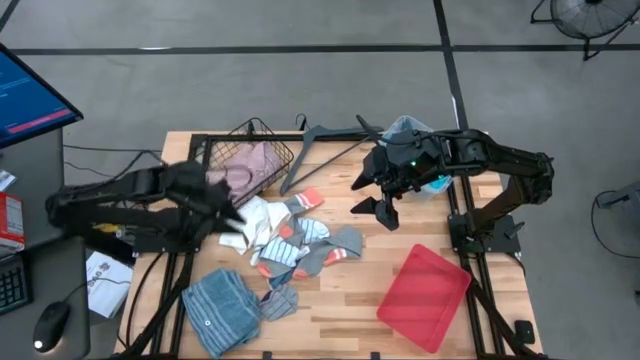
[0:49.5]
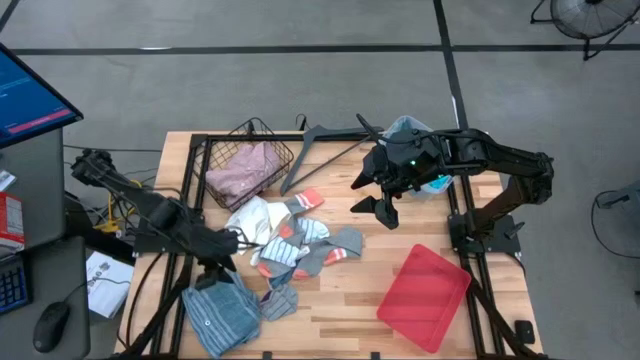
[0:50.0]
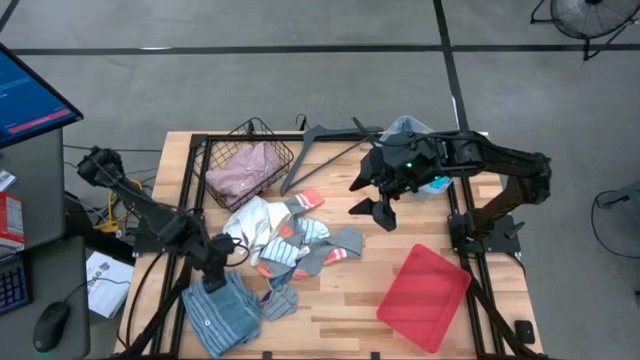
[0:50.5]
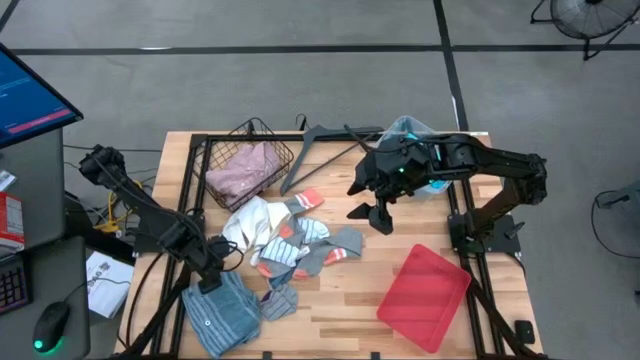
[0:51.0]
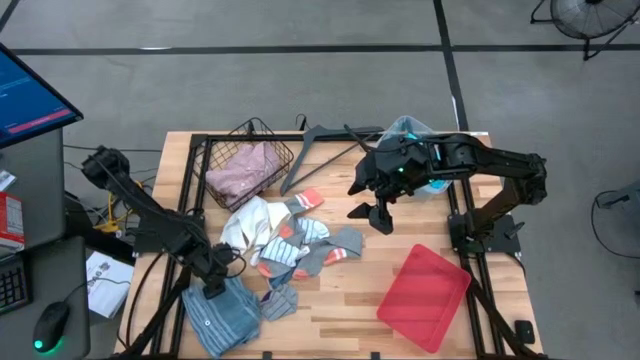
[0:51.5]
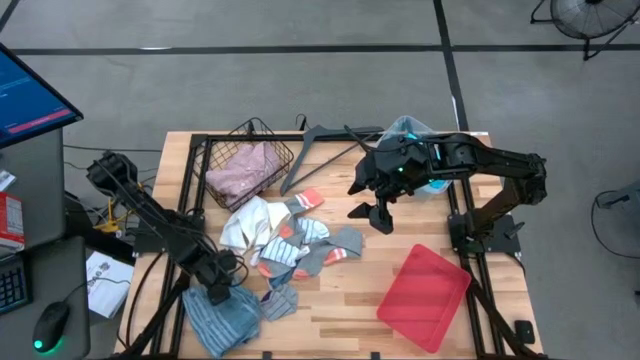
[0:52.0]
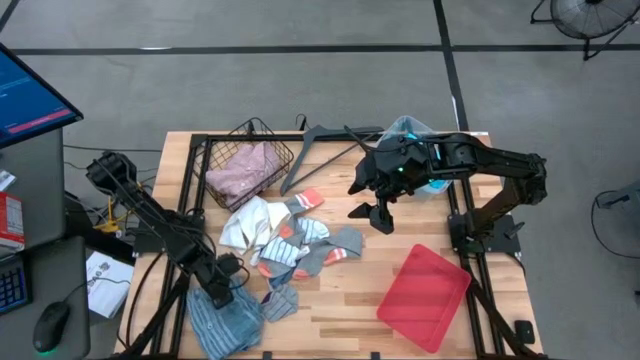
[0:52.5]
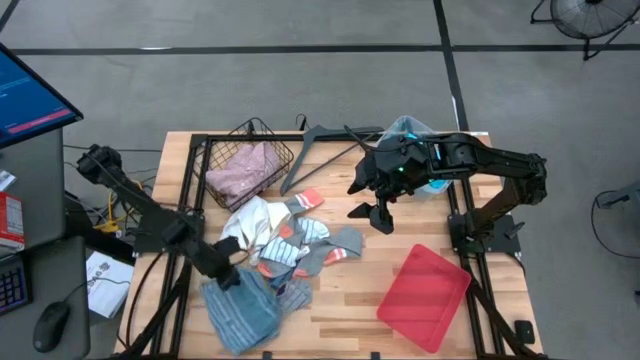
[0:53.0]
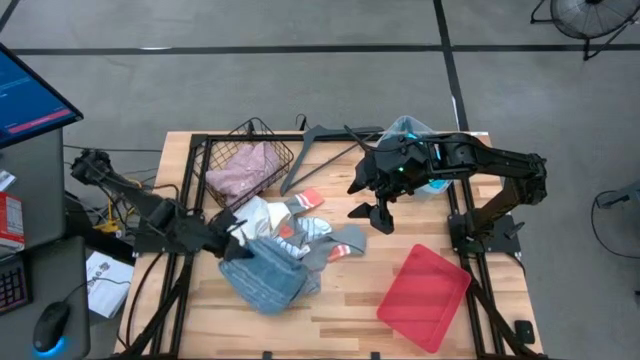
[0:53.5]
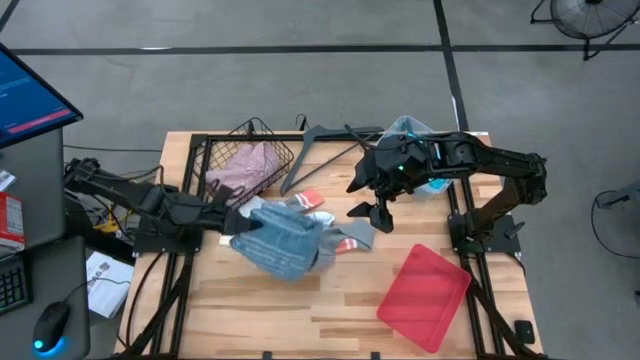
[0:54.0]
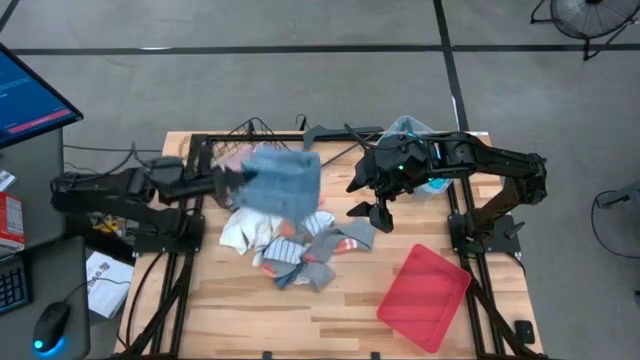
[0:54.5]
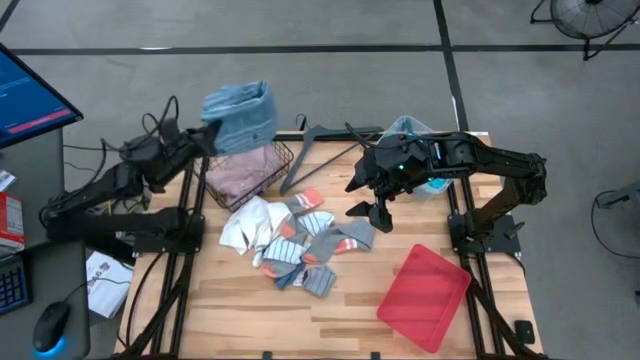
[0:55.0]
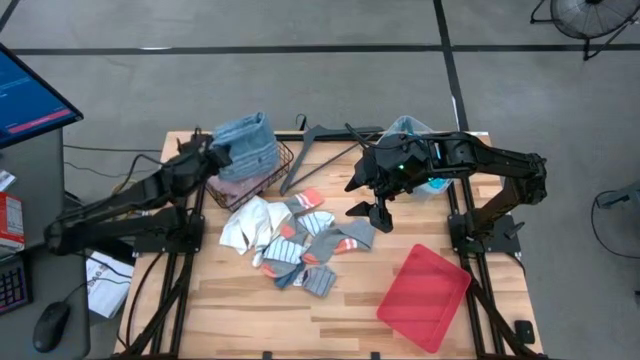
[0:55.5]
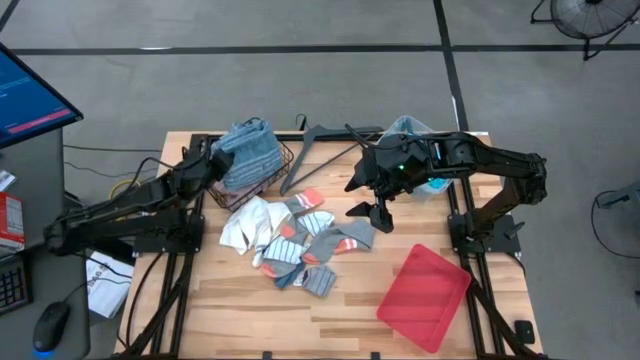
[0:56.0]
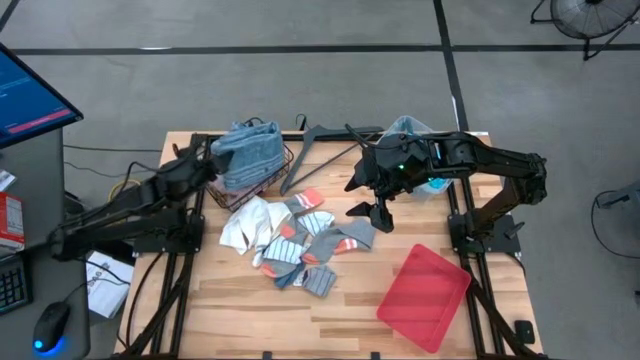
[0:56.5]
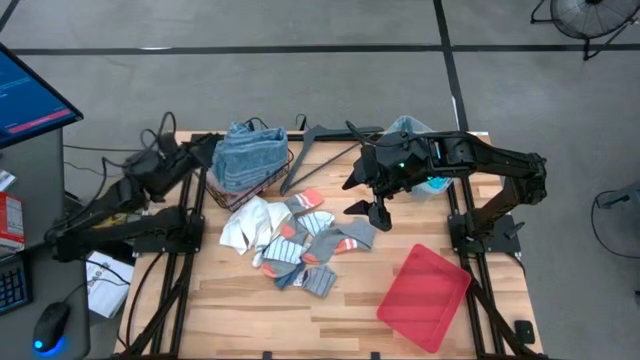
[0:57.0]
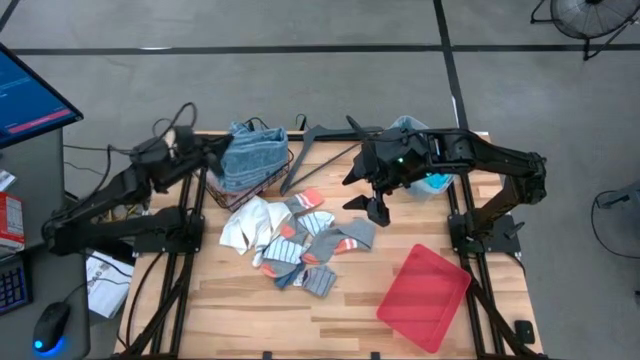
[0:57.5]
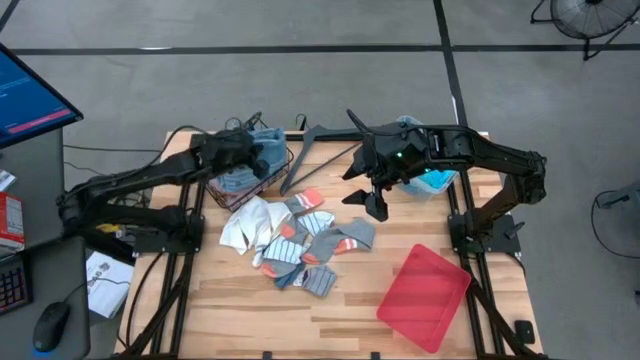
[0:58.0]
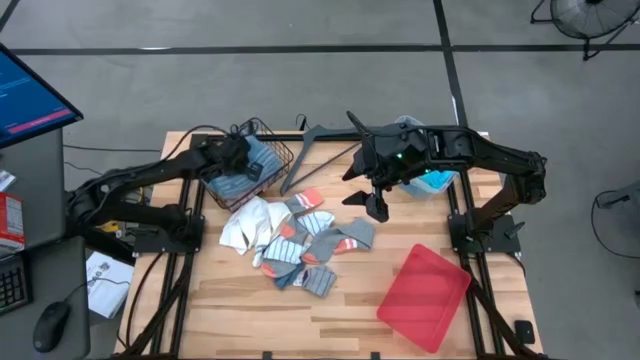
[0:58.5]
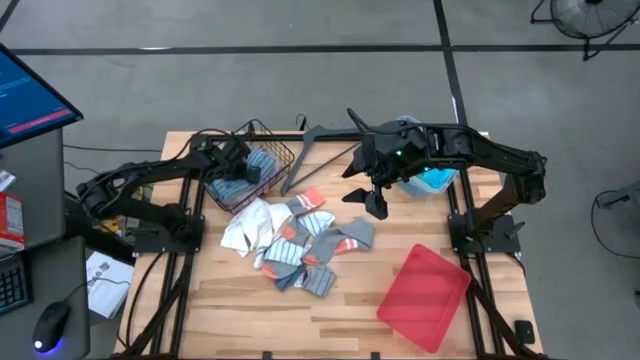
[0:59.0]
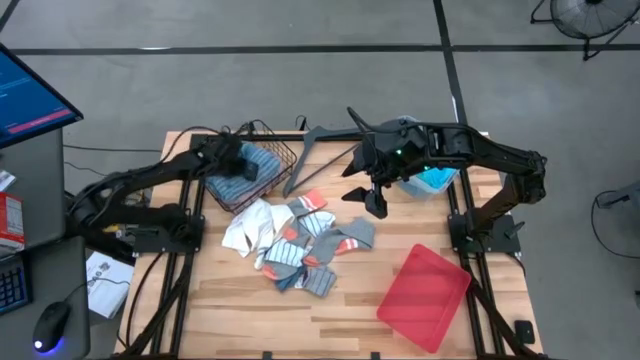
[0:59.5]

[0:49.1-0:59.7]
Task: Pick & Place Cloths
Put the blue polo shirt into the black wire basket

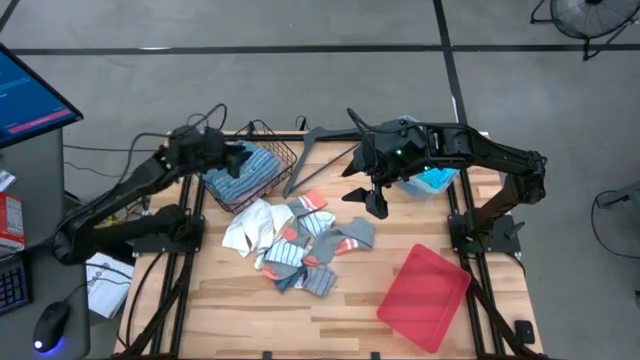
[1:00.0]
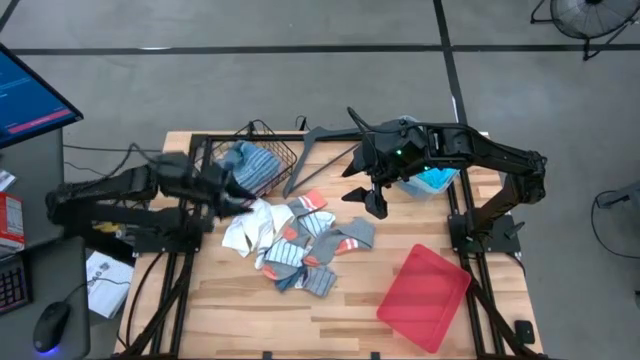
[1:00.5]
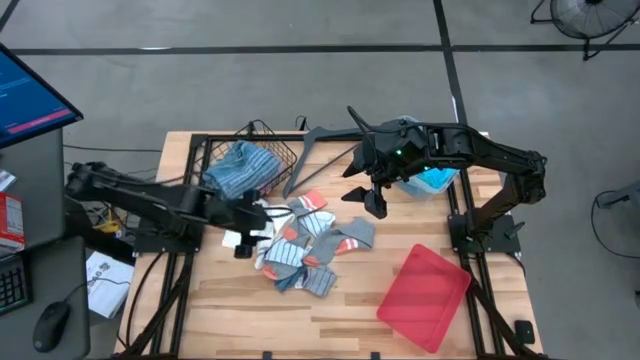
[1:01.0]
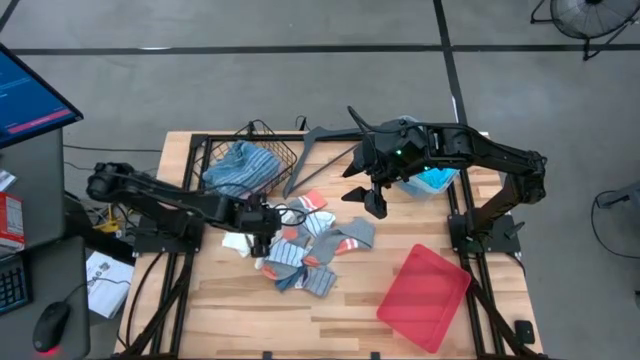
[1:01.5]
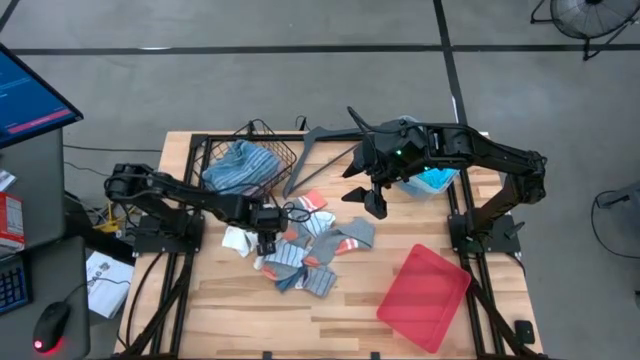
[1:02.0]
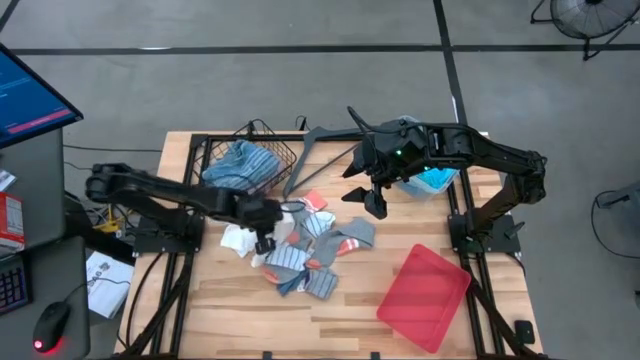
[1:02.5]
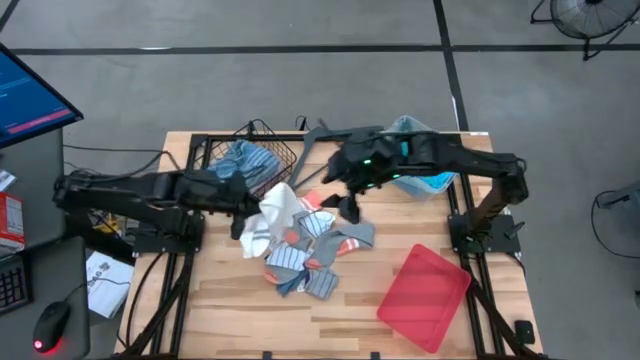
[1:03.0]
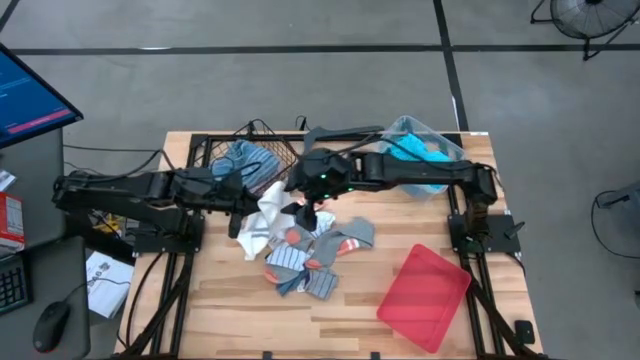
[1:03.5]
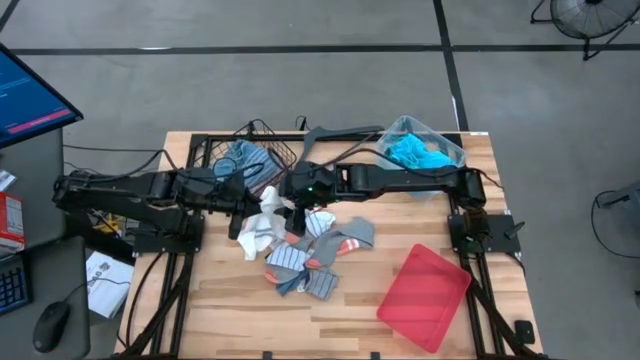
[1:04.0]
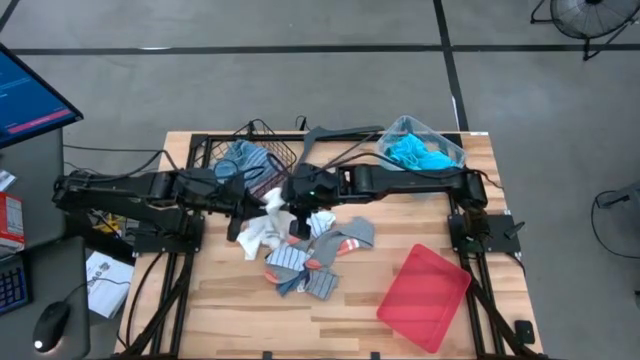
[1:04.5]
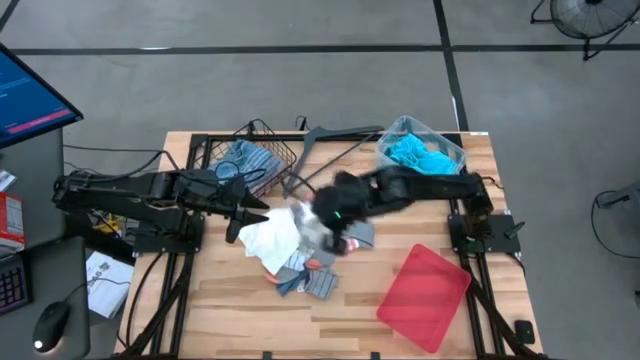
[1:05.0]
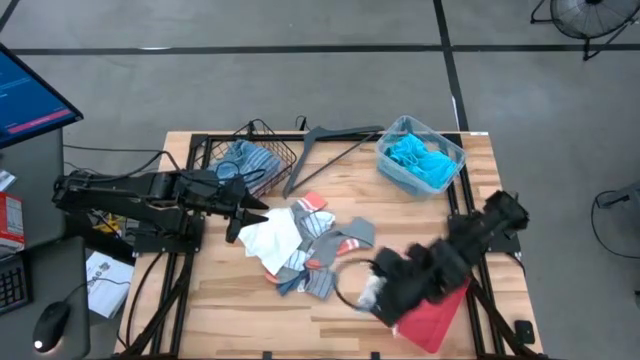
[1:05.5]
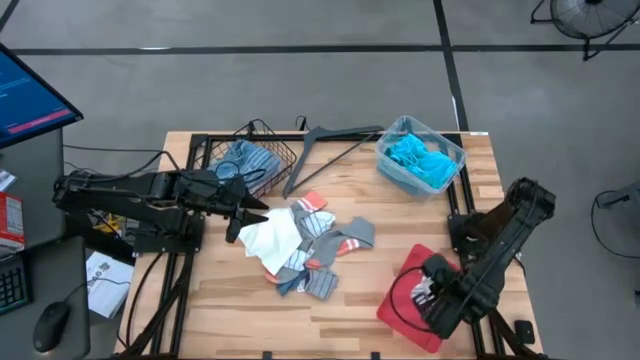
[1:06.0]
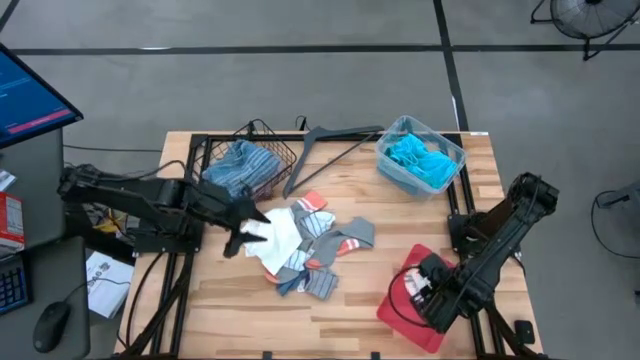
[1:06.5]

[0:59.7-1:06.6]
Put the white sock into the red bin
